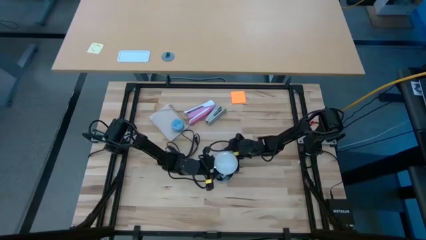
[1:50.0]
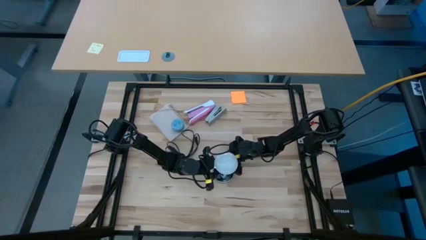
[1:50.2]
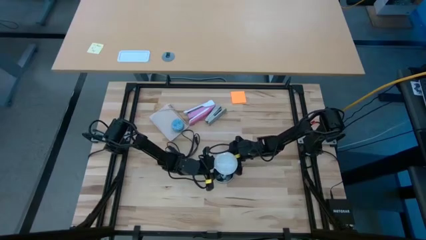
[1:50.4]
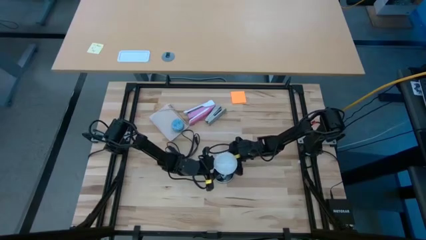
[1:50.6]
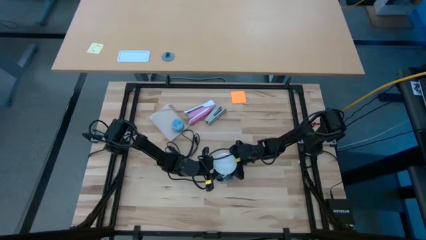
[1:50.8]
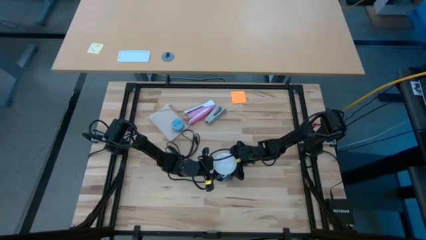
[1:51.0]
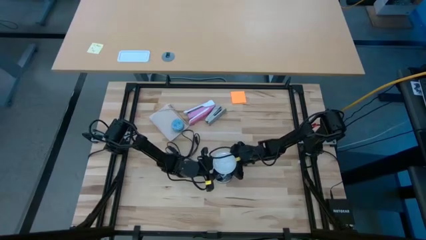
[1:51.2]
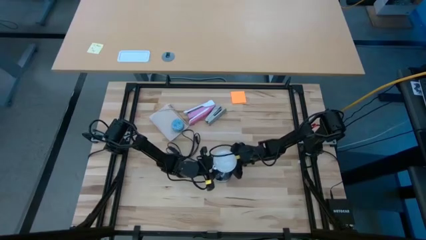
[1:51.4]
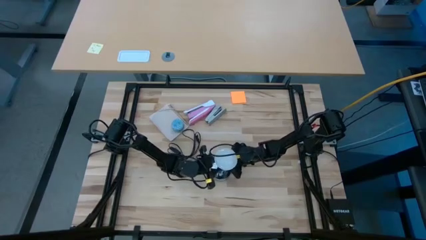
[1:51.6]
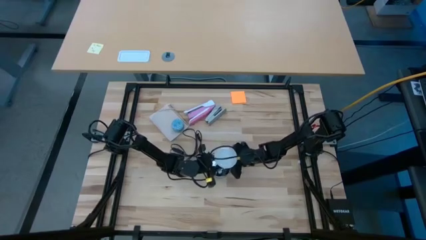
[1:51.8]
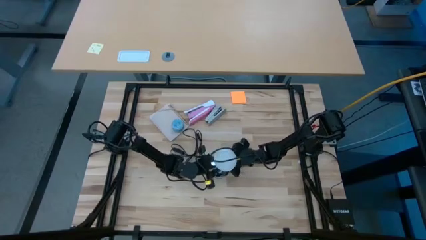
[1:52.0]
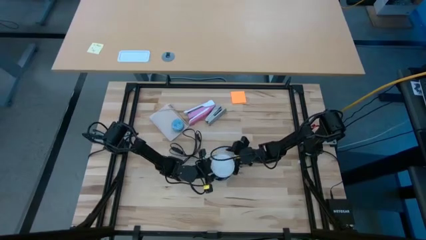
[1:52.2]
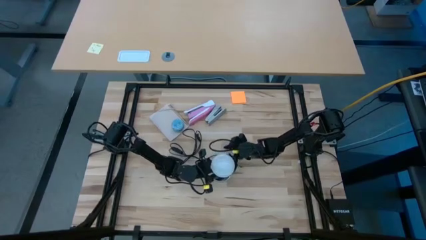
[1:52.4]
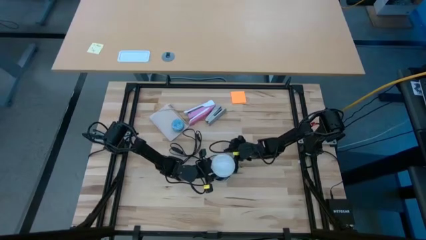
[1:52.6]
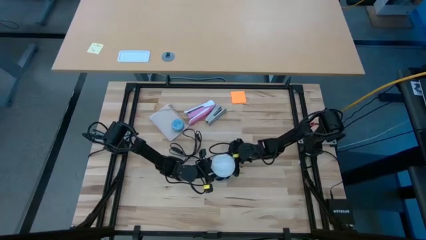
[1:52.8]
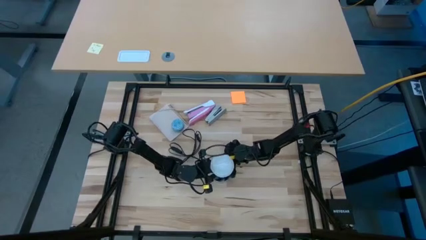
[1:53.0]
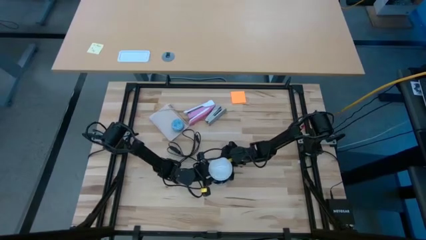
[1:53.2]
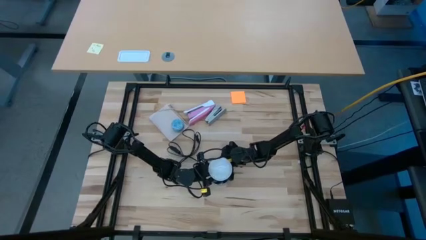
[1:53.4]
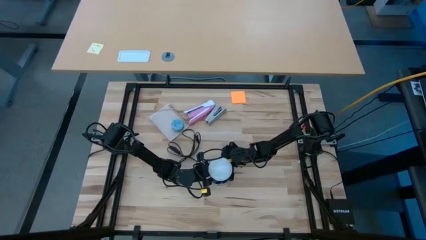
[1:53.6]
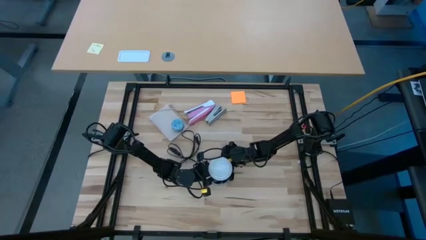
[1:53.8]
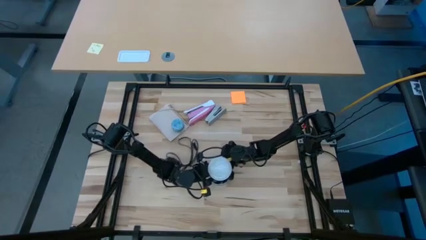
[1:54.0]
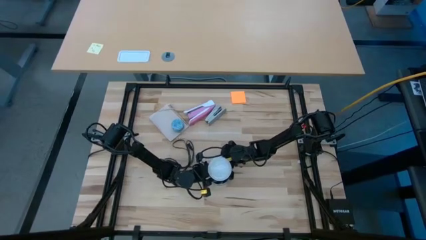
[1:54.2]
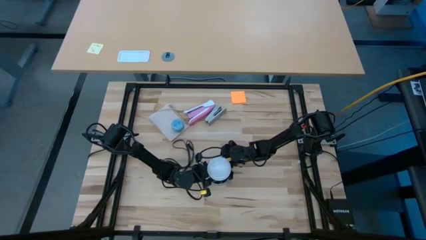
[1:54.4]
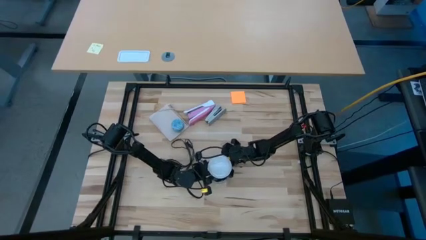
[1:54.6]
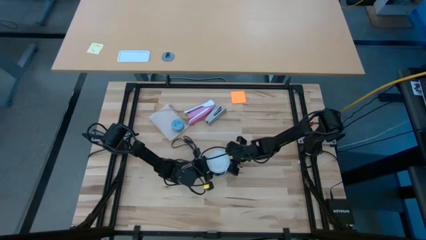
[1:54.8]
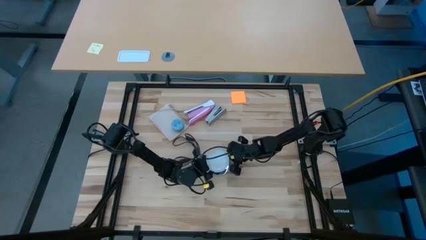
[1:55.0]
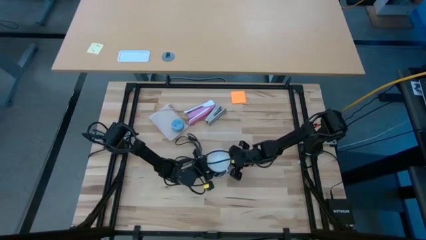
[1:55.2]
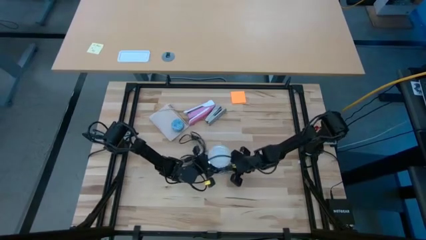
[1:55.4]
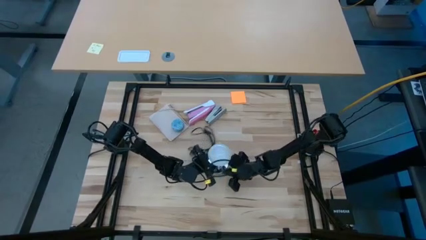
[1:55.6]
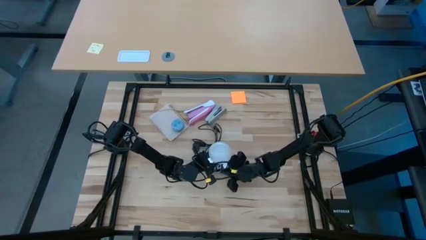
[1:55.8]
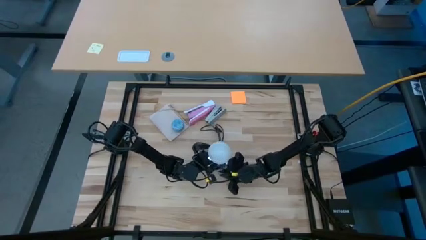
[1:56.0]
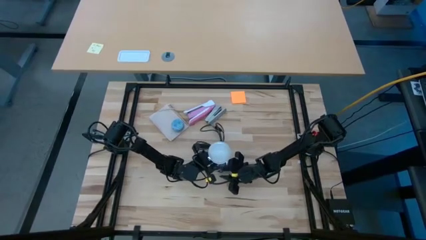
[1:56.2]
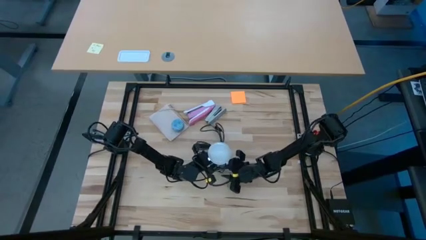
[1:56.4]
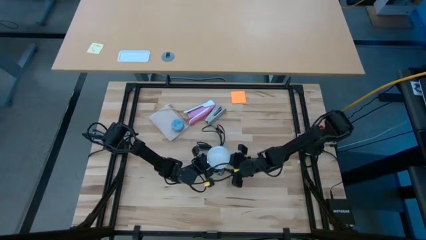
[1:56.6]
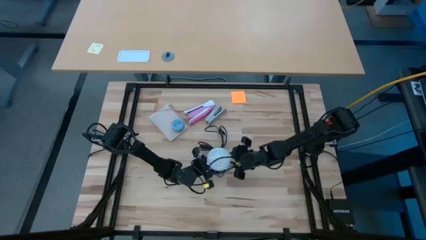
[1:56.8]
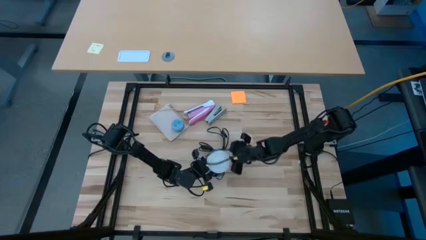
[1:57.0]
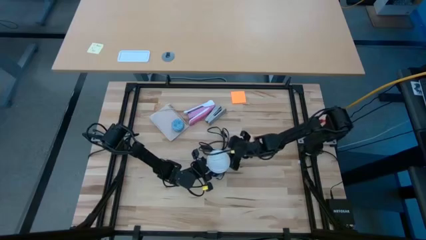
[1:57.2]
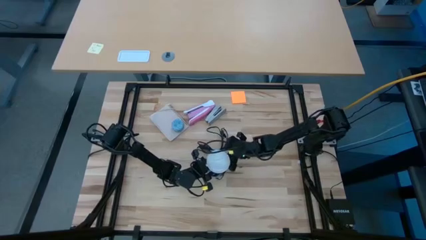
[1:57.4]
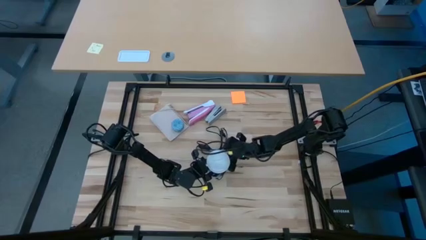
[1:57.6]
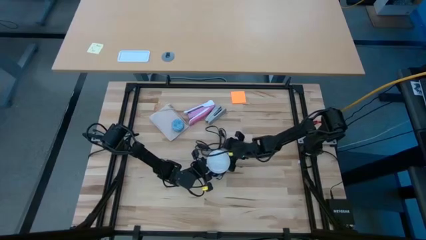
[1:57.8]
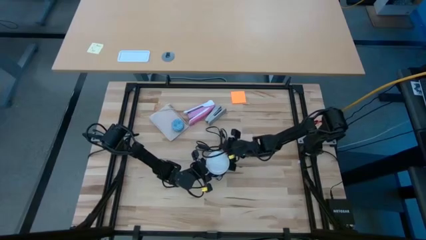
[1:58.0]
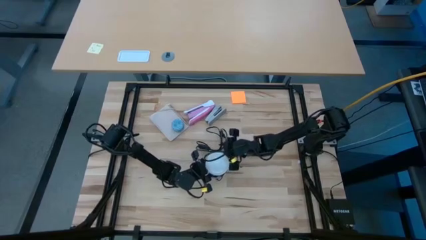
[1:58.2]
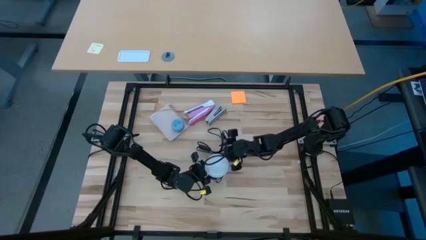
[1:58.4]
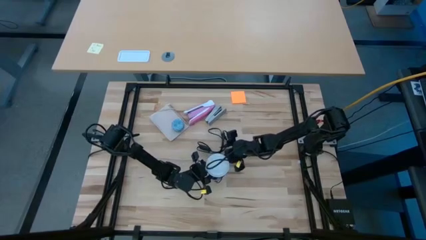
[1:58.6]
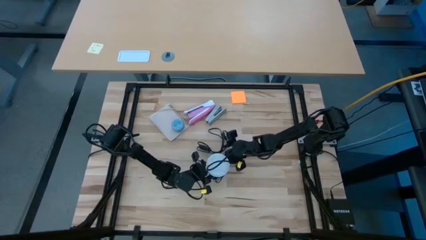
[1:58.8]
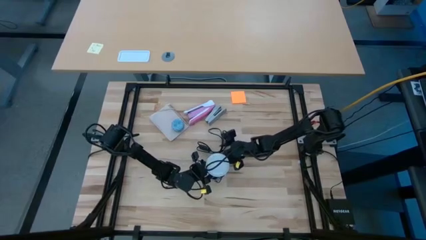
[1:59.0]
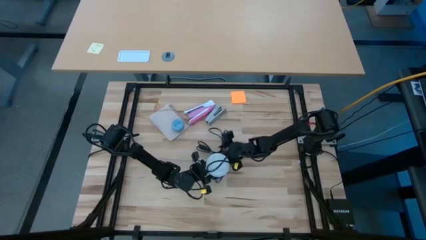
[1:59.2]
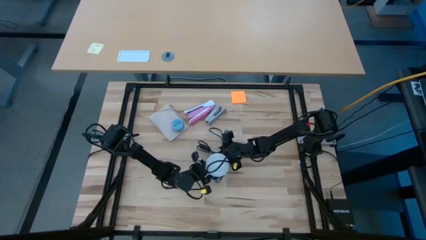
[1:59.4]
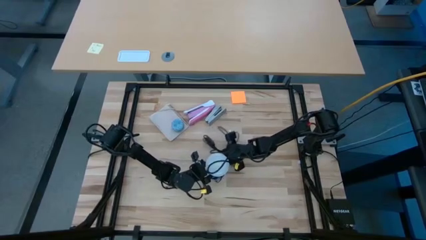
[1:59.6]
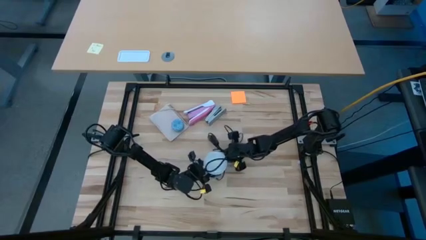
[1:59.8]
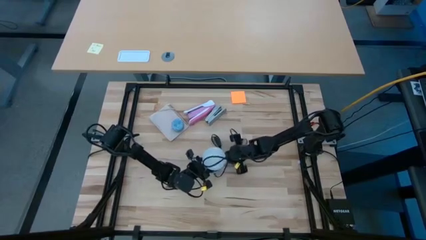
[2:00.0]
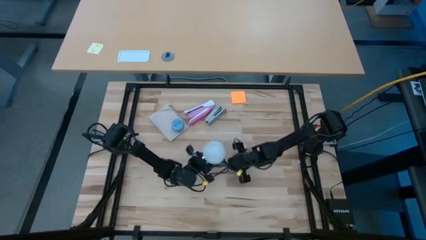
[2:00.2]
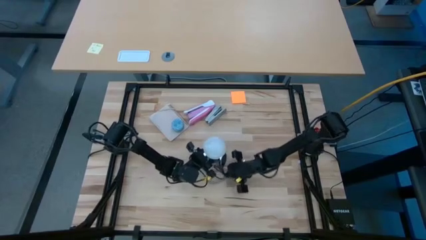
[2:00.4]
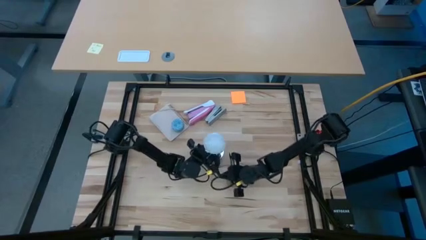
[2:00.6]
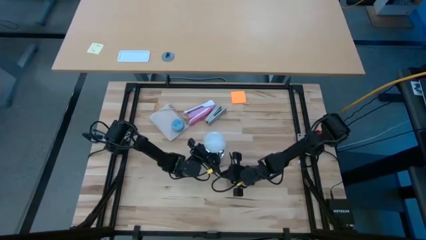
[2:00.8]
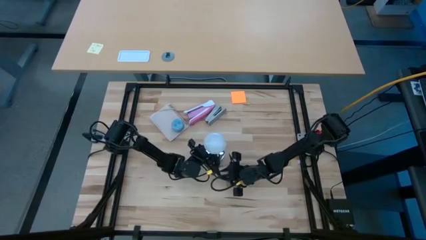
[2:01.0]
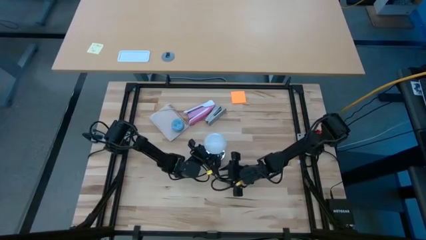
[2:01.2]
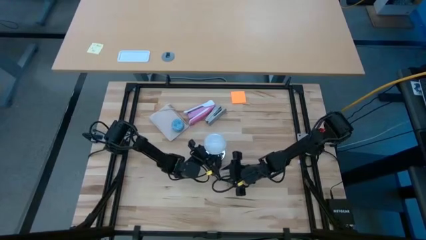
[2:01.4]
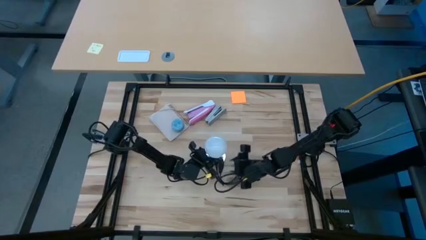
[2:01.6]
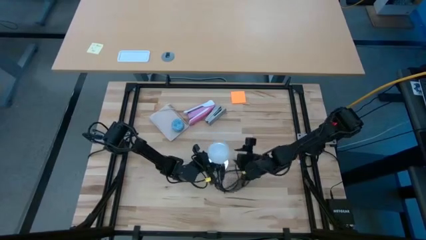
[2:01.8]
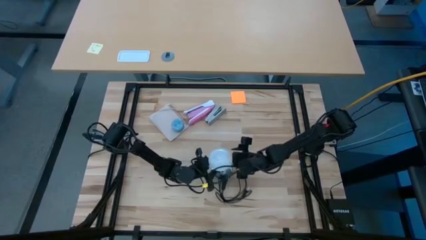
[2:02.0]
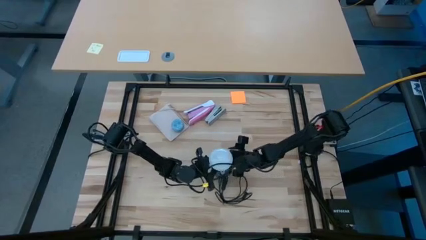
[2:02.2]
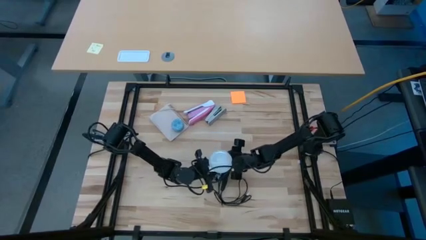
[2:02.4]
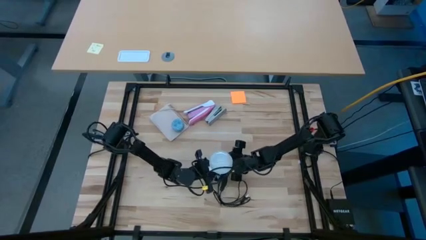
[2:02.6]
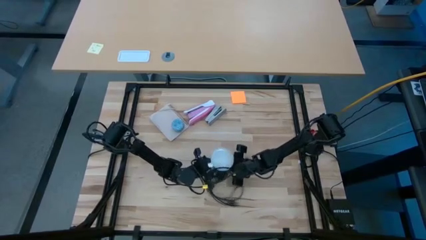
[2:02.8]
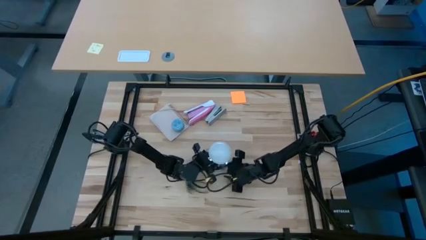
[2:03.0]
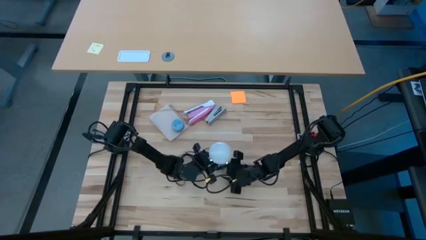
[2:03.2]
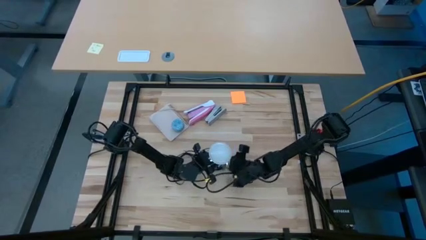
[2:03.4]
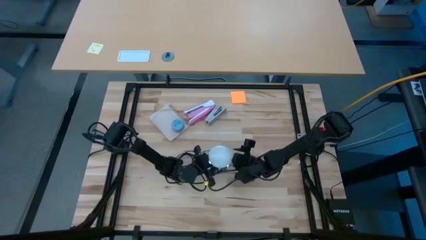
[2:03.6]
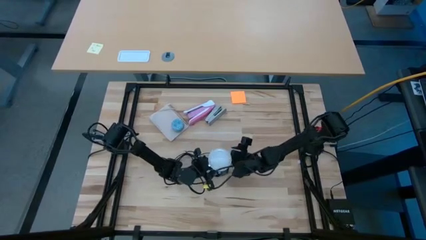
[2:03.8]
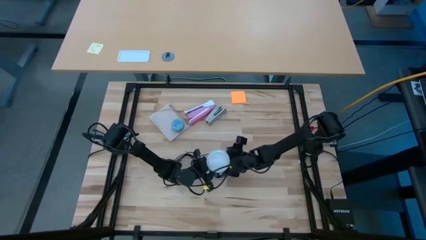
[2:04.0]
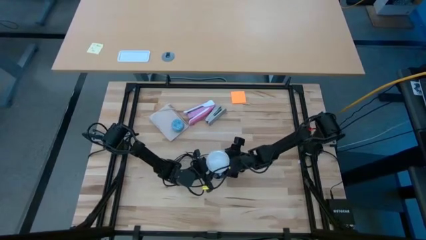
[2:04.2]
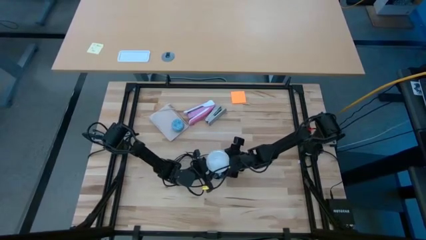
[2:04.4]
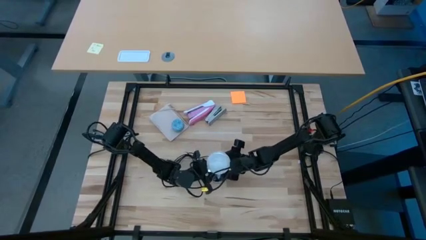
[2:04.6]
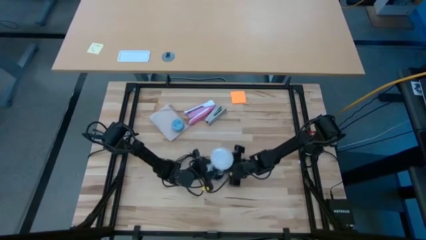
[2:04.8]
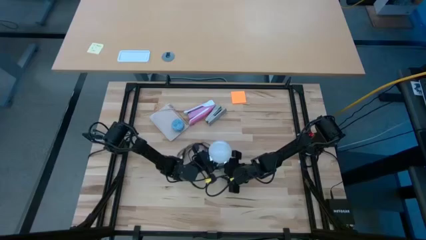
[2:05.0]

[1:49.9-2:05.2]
Task: Screw lightbulb
Remove the white lightbulb from the silver desk lamp

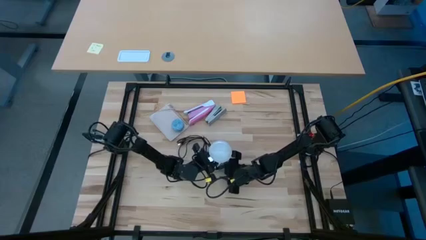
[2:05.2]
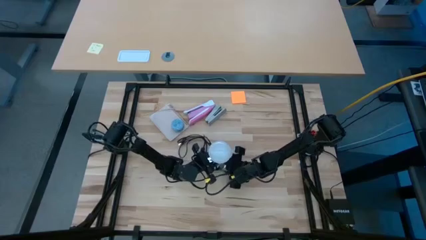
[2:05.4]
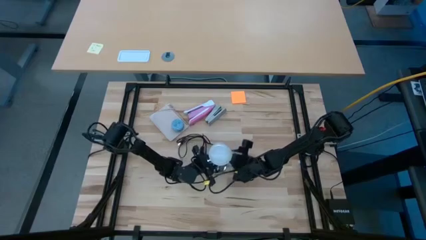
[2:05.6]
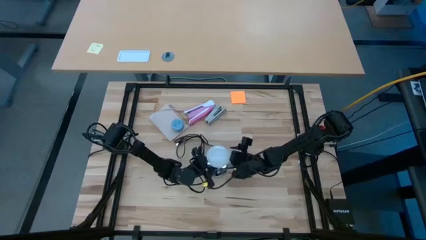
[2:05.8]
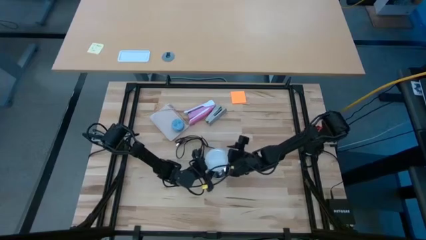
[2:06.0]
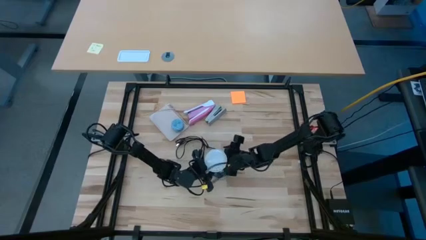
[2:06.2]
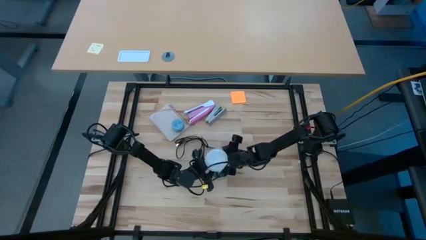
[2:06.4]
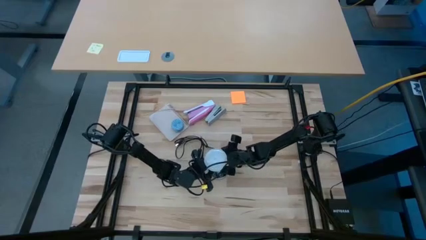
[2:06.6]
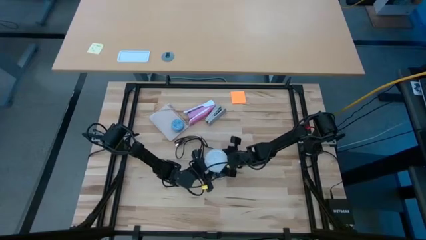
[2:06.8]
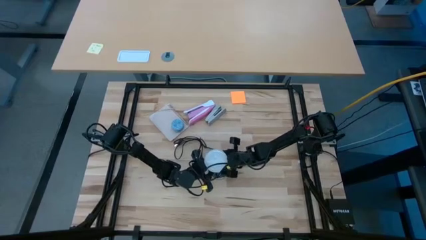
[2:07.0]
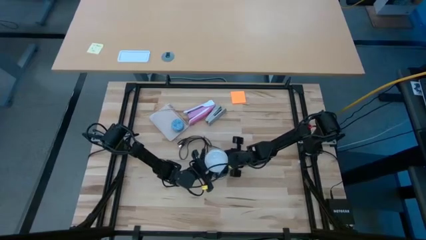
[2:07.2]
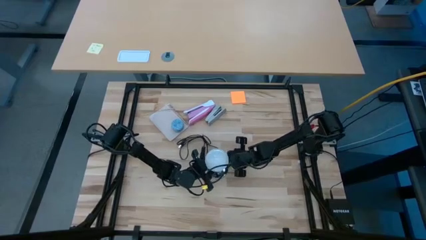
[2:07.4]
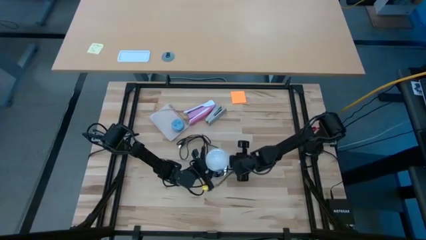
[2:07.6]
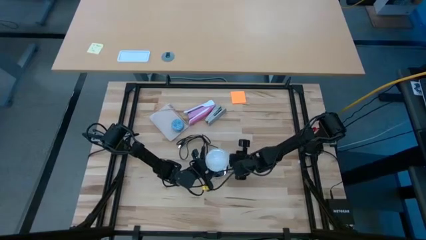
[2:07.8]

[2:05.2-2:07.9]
Remove the white lightbulb from the silver desk lamp
